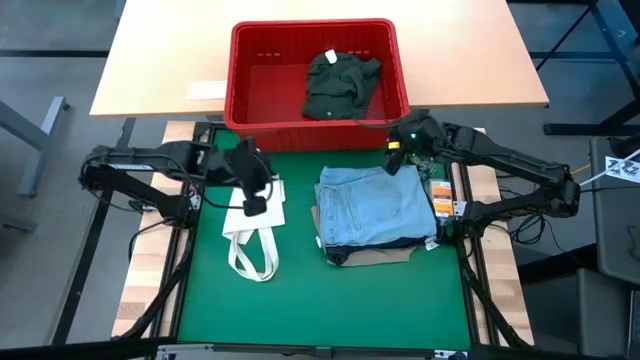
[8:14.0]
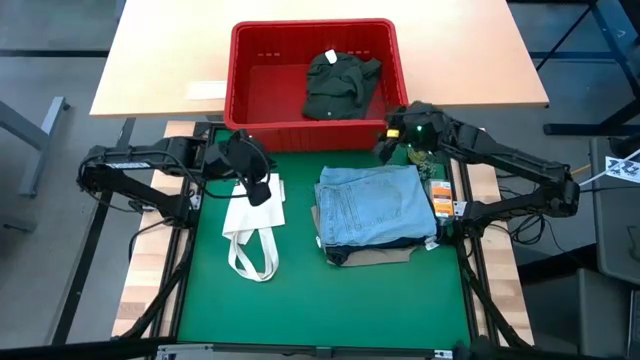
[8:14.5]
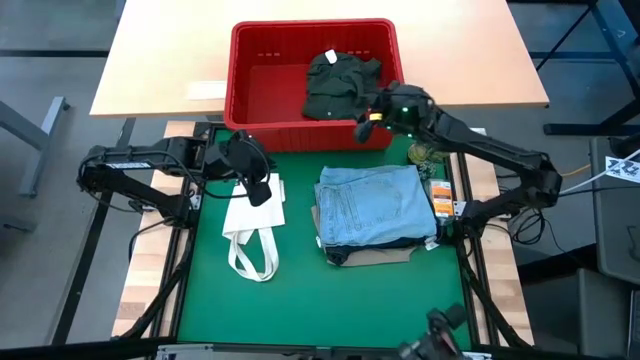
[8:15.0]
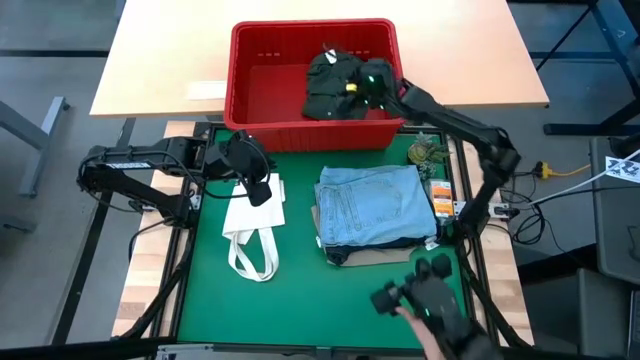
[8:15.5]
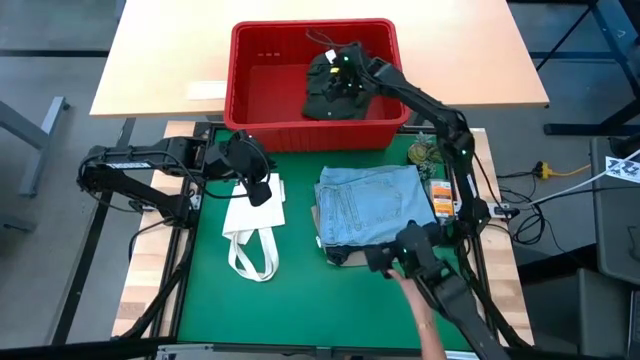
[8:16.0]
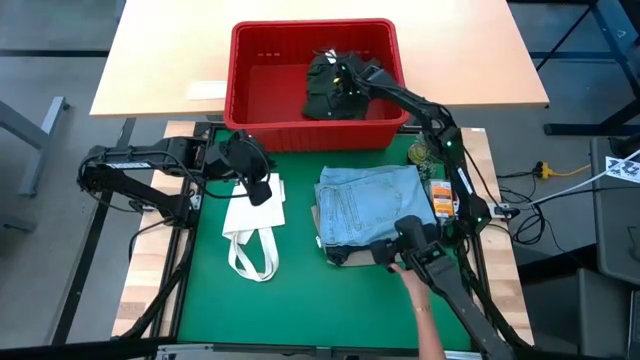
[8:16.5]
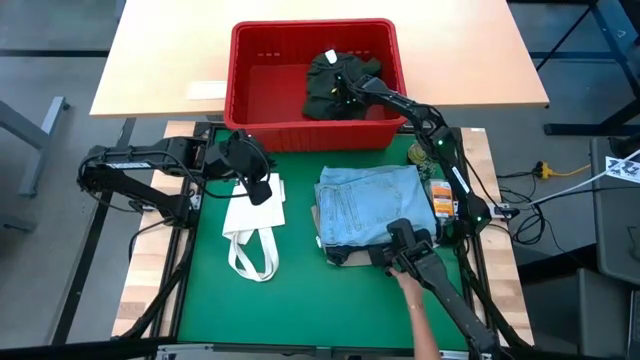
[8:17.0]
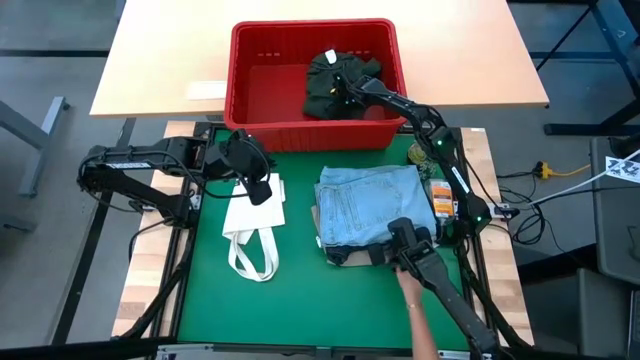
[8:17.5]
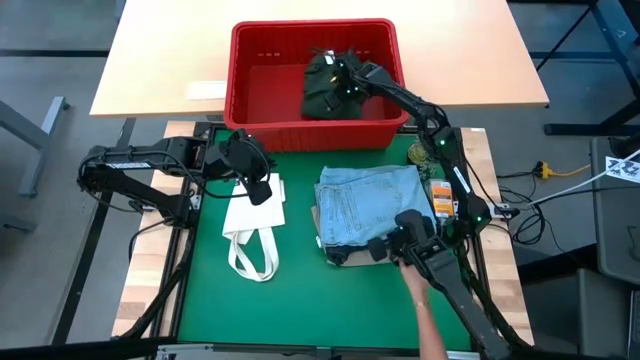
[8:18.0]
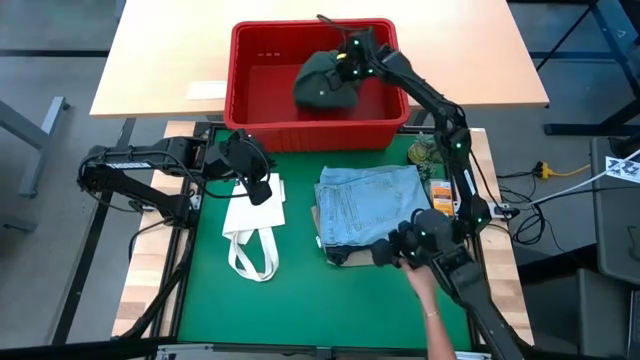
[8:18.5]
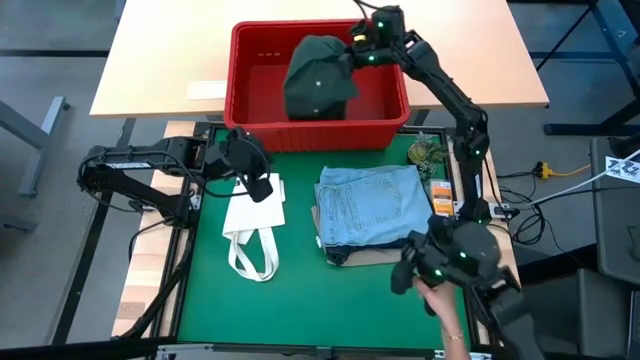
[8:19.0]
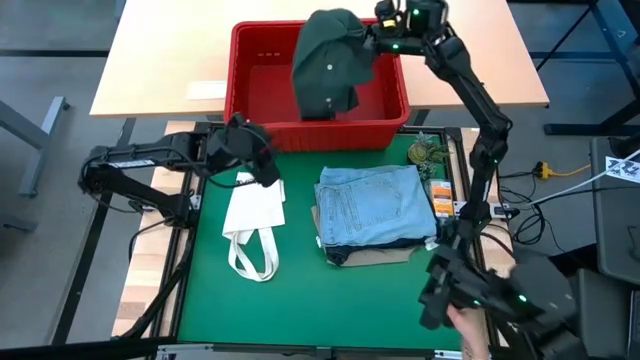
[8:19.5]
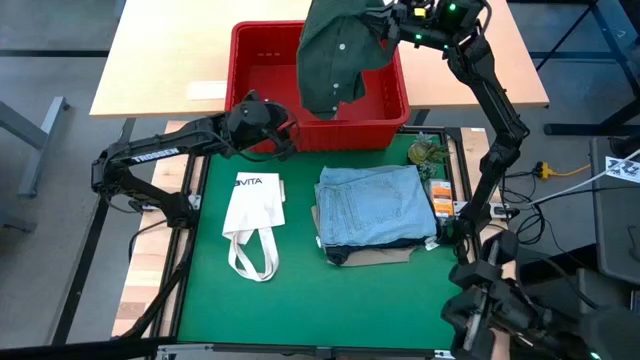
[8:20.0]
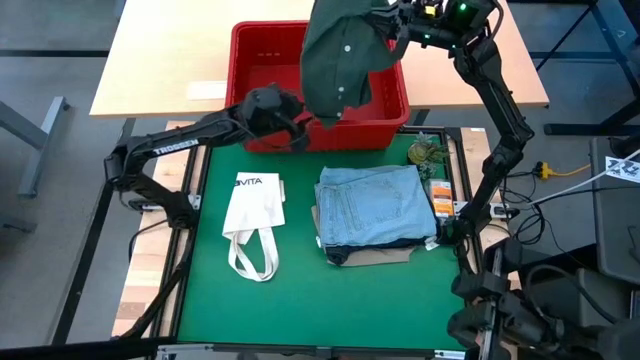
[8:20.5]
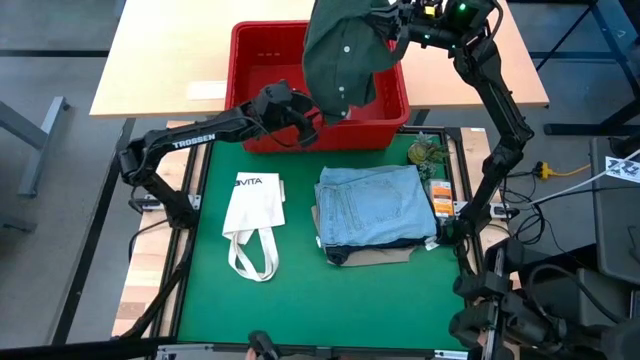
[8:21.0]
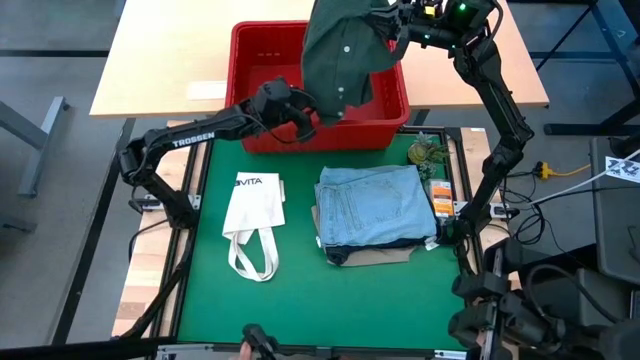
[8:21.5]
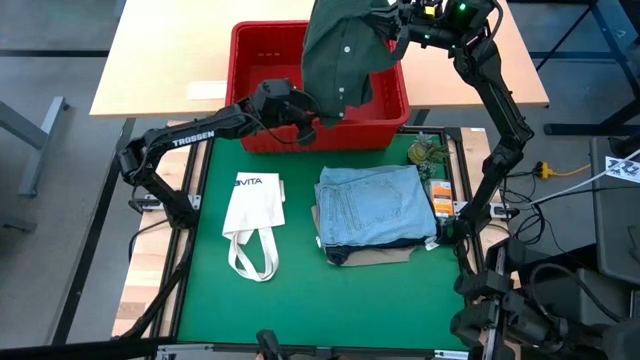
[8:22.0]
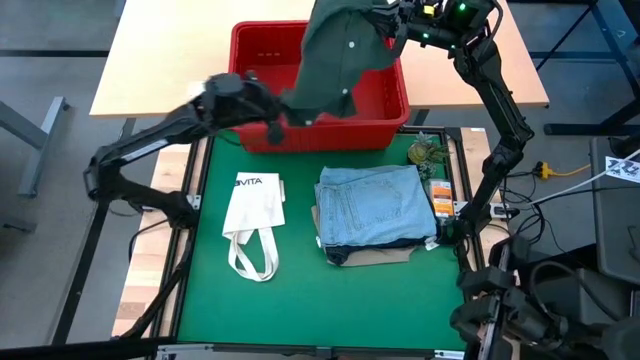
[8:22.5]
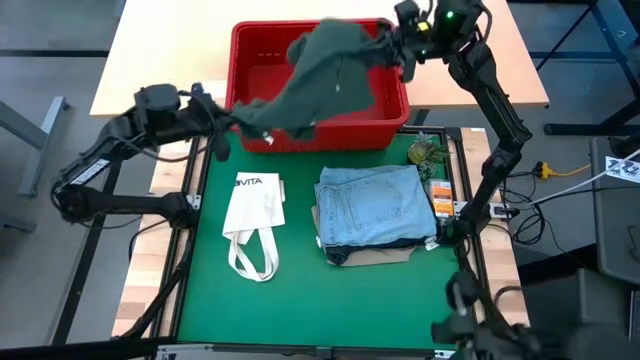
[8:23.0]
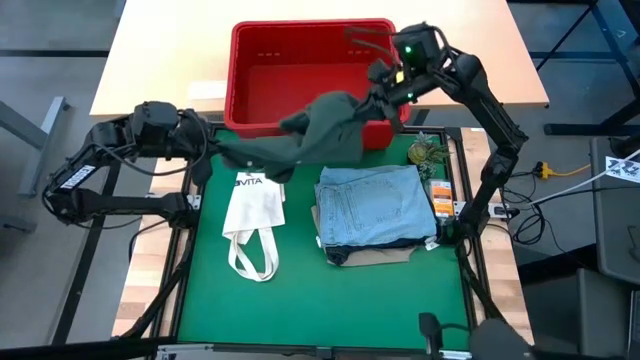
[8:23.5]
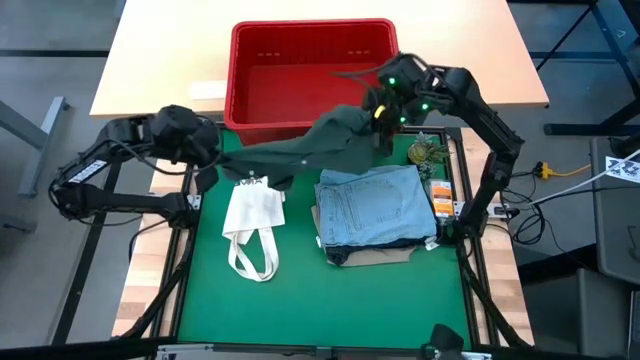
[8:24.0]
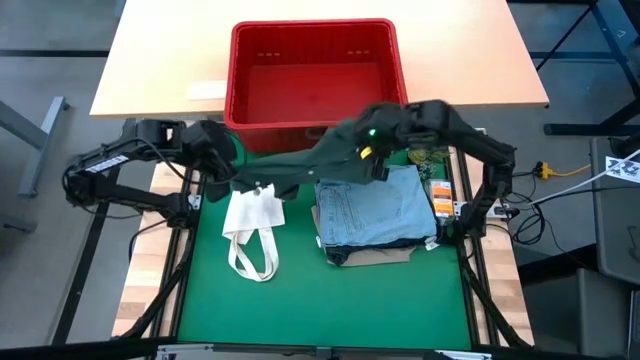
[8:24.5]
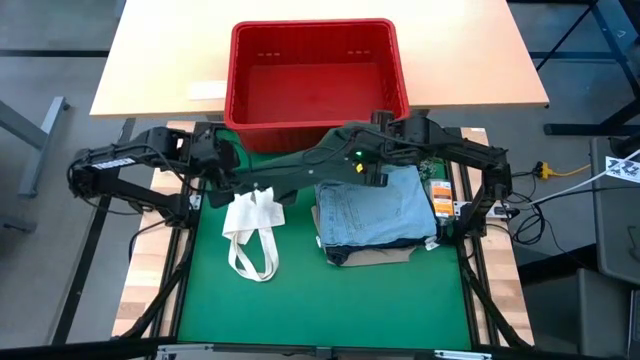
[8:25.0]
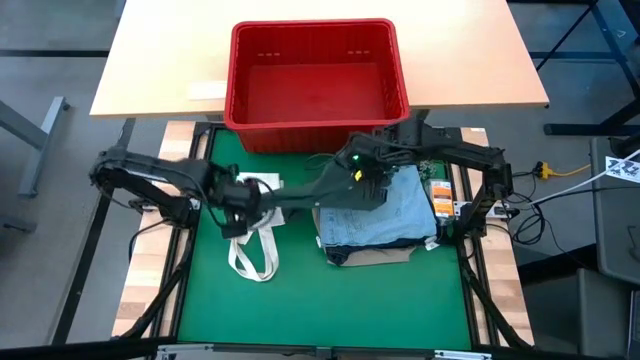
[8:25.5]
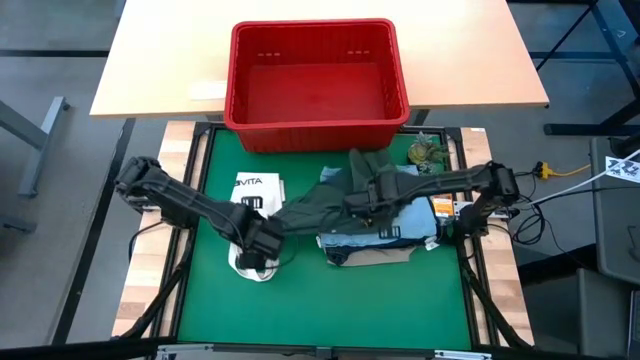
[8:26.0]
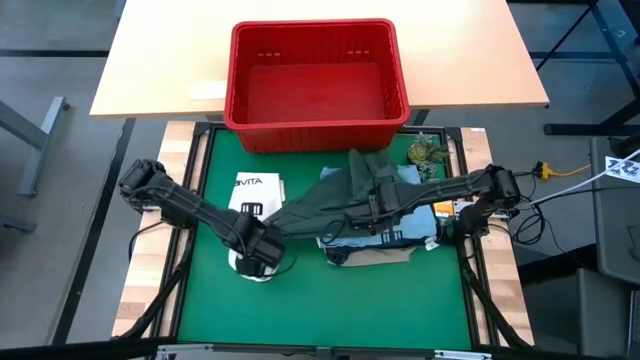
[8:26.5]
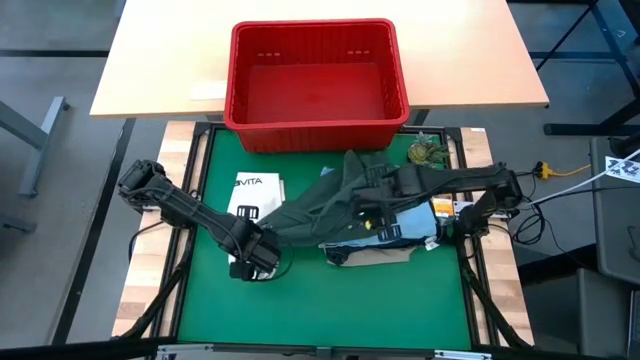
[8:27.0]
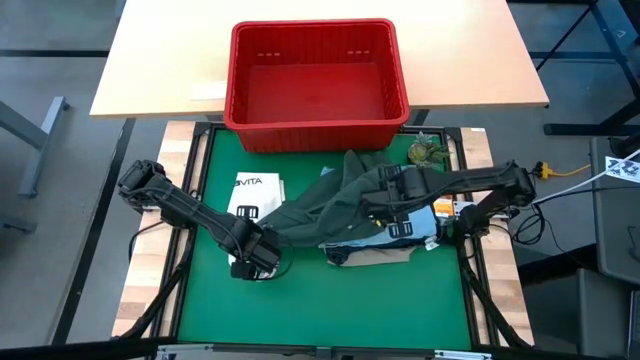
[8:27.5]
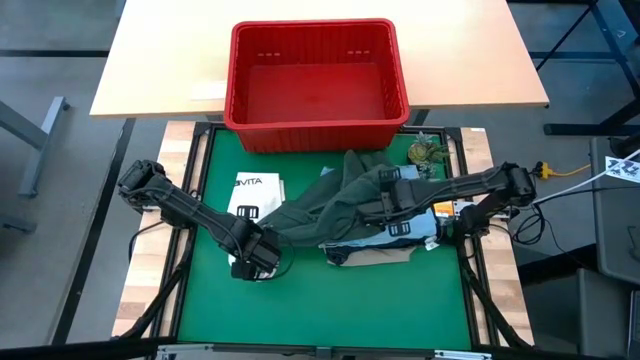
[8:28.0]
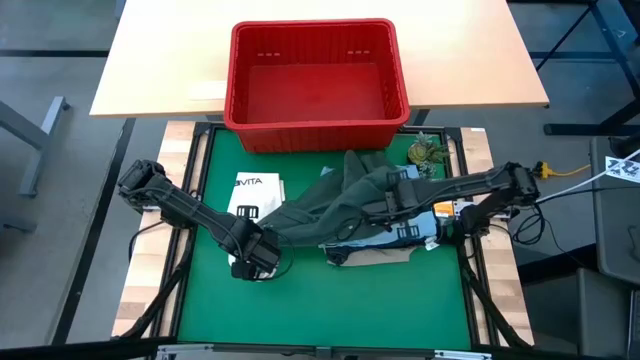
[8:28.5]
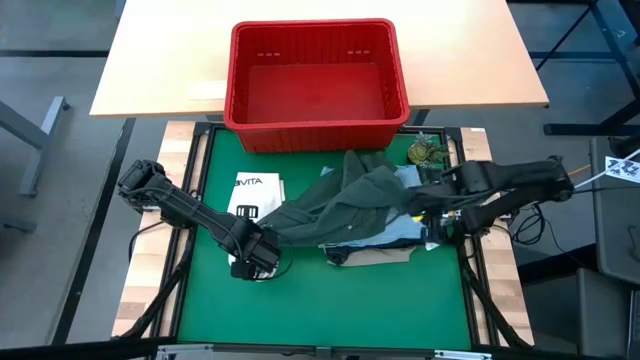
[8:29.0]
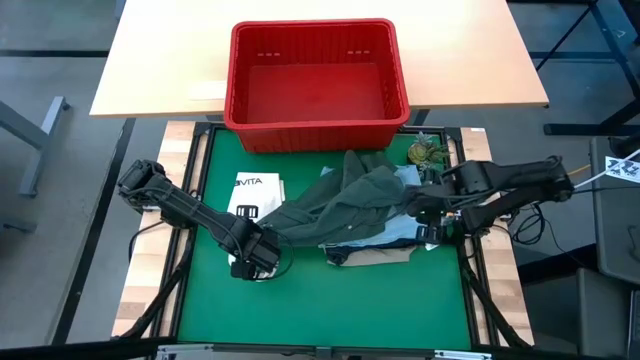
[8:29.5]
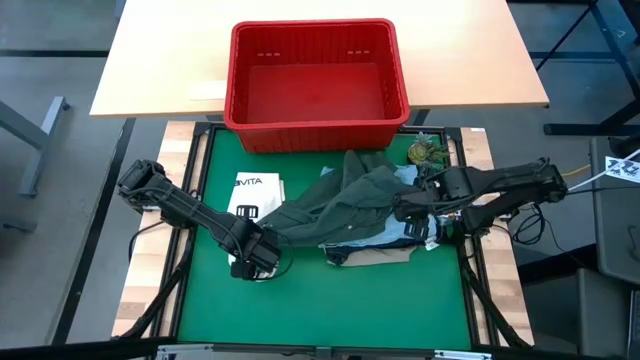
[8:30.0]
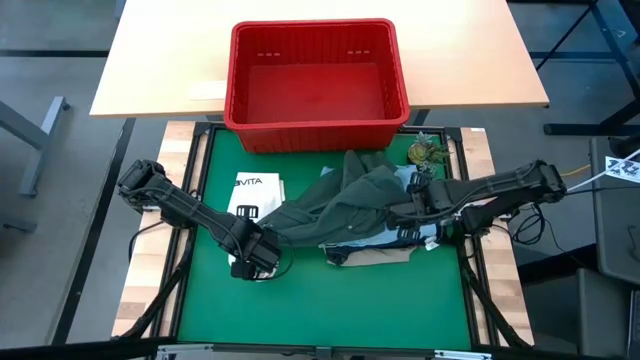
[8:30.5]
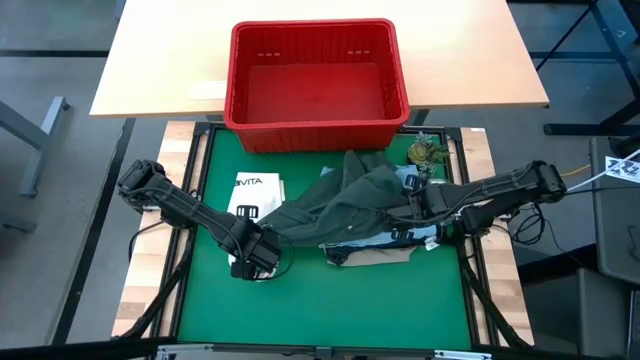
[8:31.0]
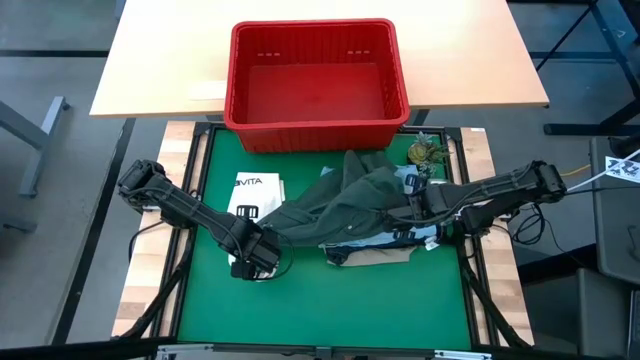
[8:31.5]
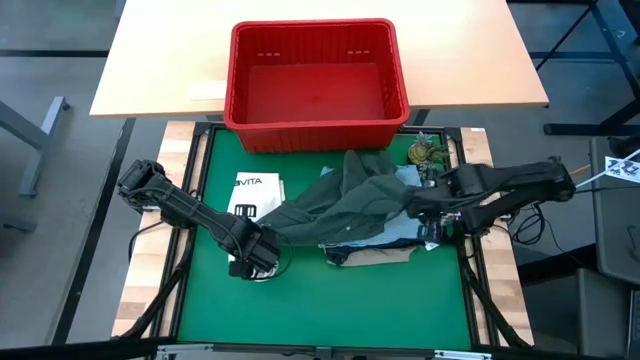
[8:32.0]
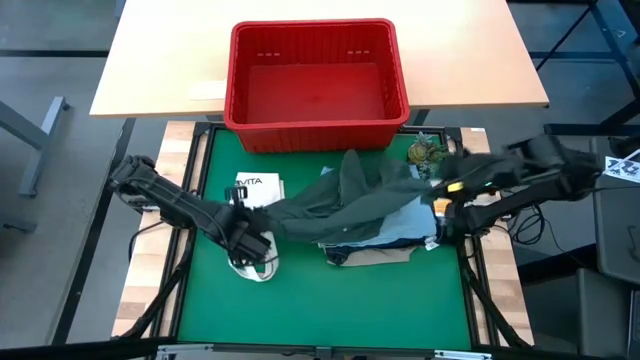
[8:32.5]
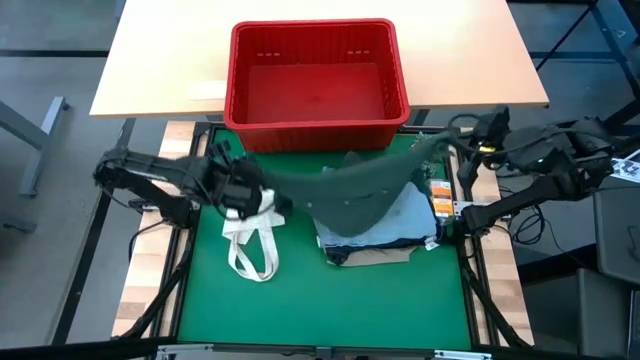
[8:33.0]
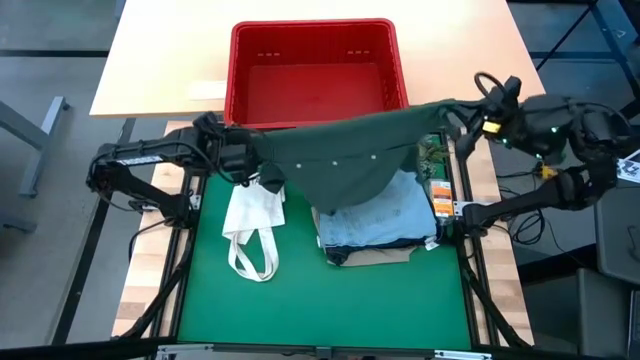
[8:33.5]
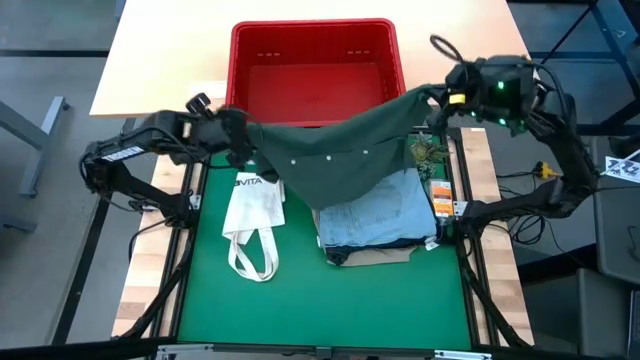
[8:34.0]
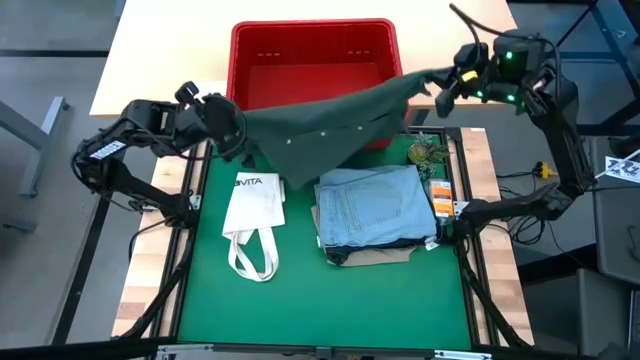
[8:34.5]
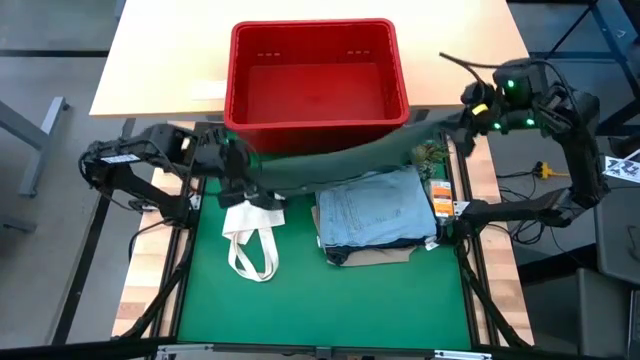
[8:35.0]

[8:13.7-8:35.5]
Task: Fold Laundry from Bin
Fold the green shirt
